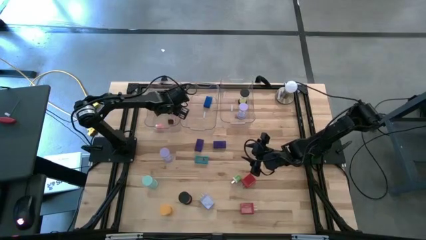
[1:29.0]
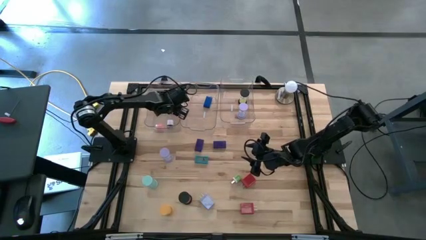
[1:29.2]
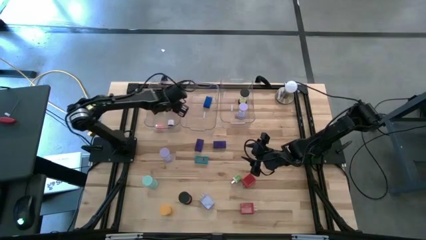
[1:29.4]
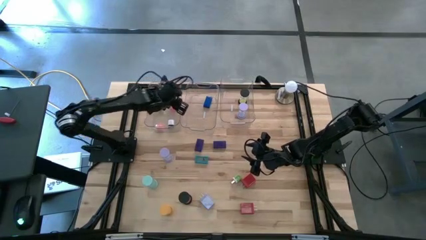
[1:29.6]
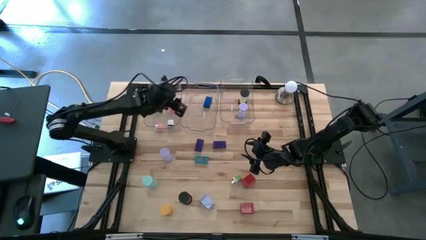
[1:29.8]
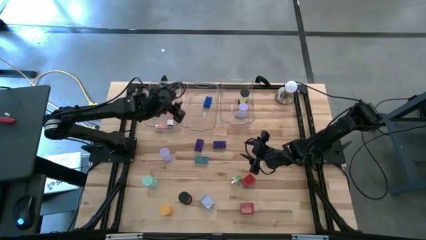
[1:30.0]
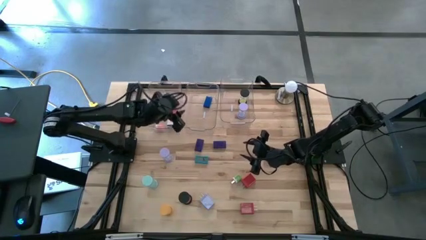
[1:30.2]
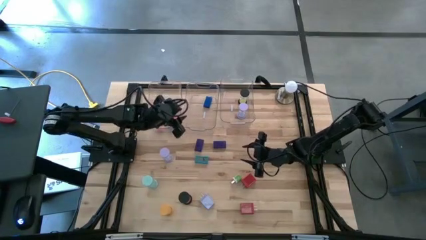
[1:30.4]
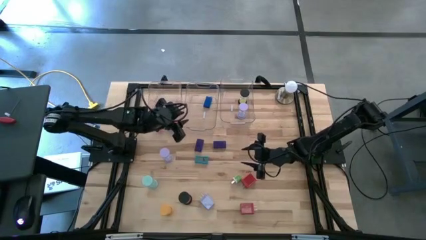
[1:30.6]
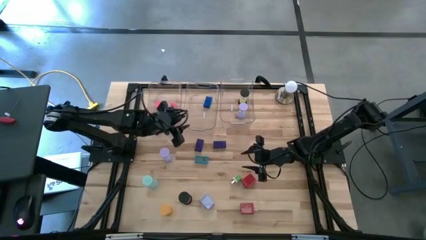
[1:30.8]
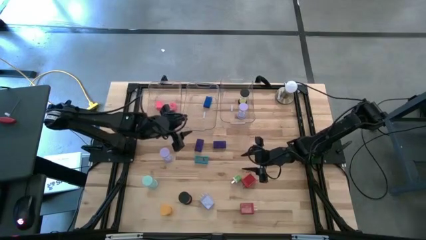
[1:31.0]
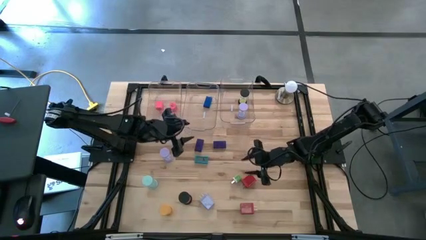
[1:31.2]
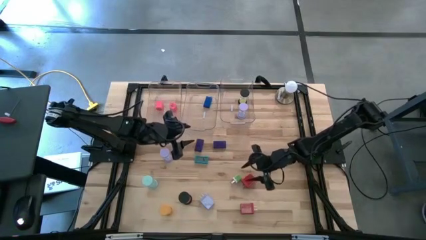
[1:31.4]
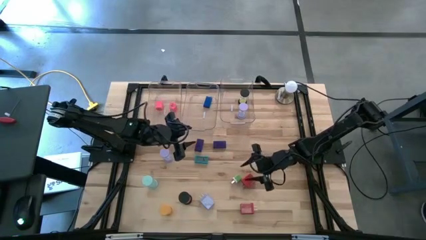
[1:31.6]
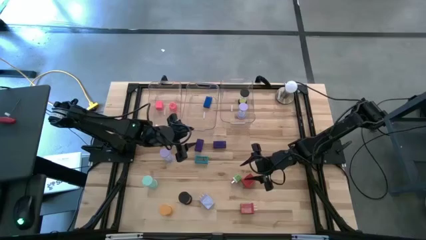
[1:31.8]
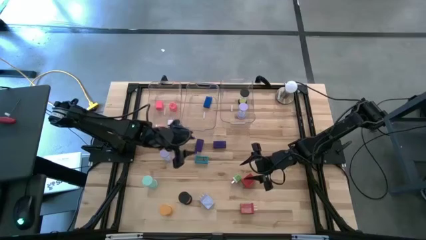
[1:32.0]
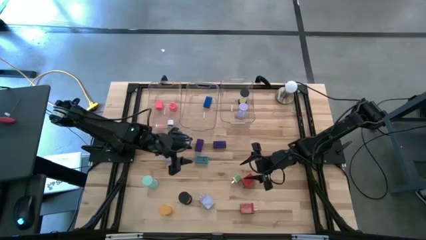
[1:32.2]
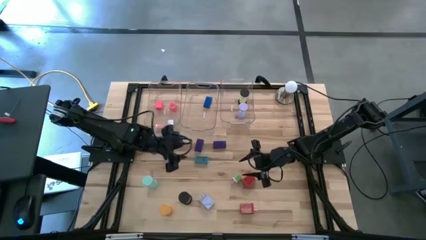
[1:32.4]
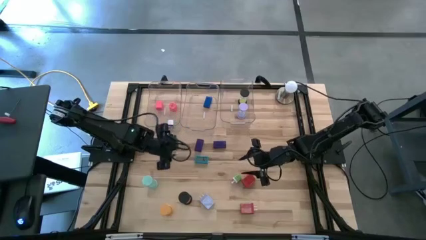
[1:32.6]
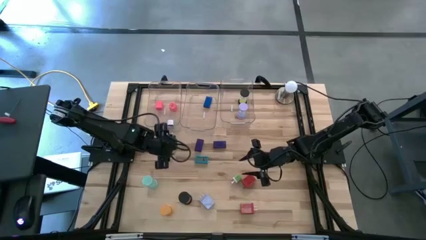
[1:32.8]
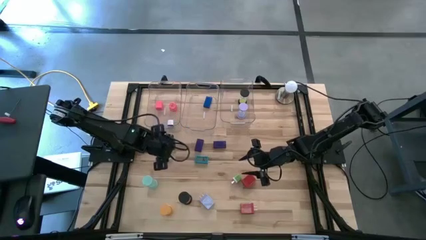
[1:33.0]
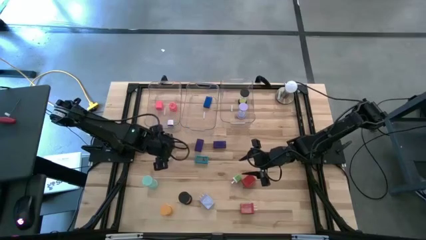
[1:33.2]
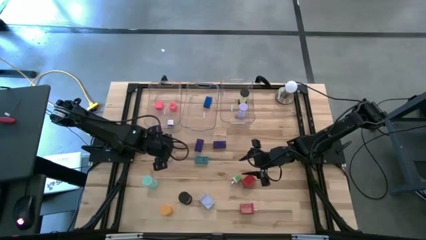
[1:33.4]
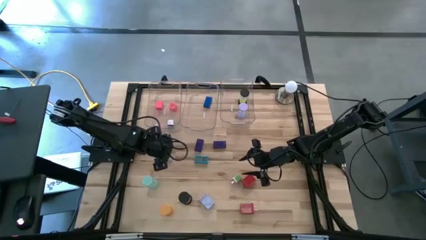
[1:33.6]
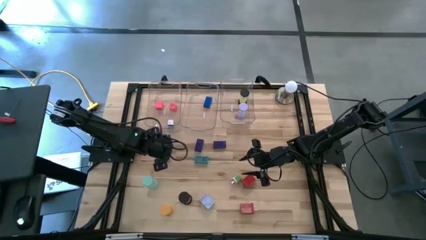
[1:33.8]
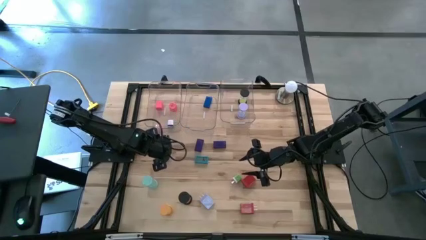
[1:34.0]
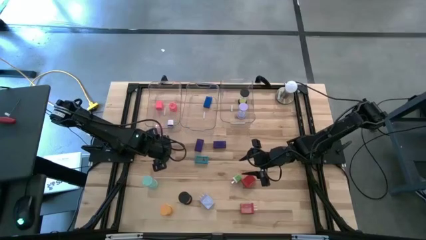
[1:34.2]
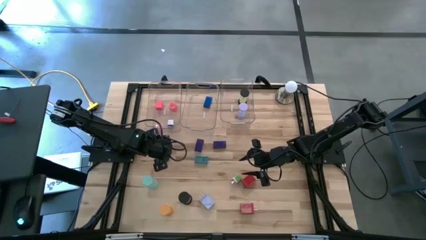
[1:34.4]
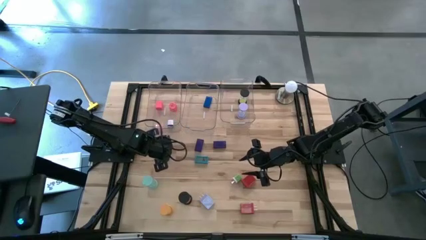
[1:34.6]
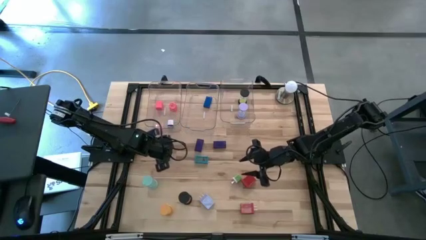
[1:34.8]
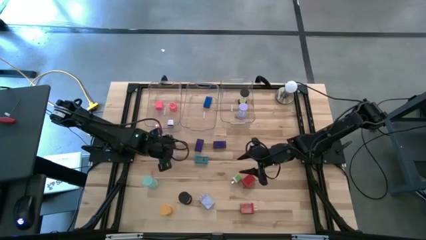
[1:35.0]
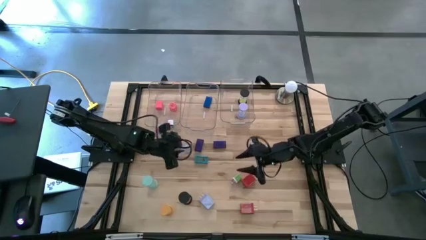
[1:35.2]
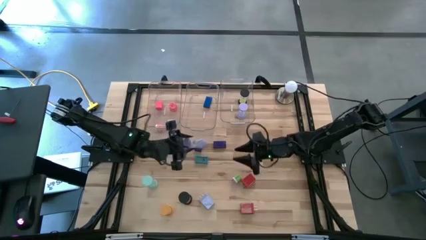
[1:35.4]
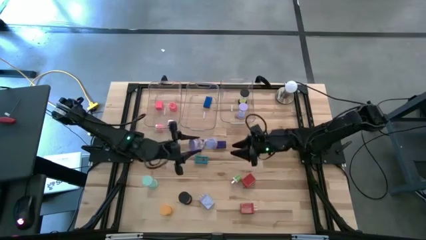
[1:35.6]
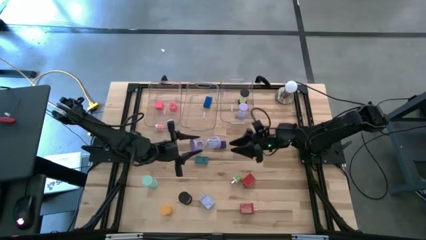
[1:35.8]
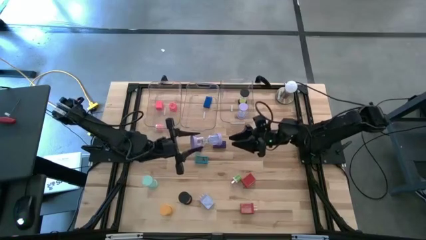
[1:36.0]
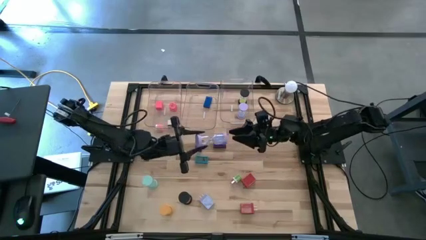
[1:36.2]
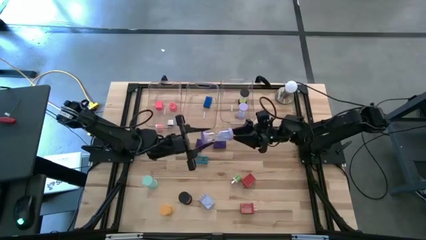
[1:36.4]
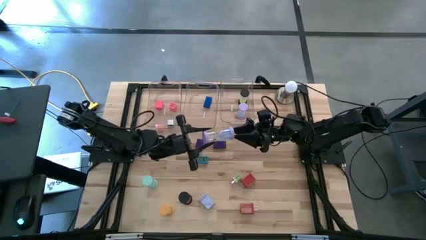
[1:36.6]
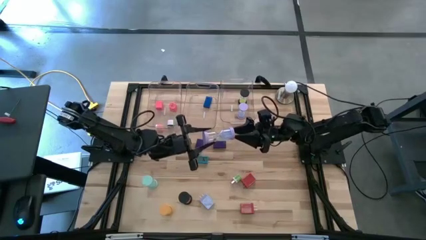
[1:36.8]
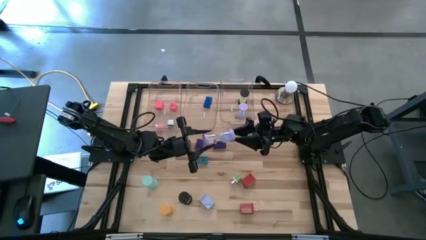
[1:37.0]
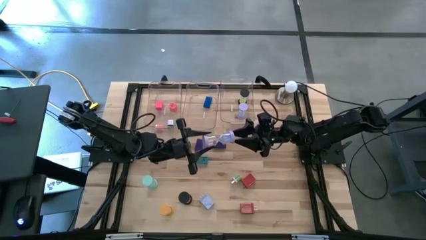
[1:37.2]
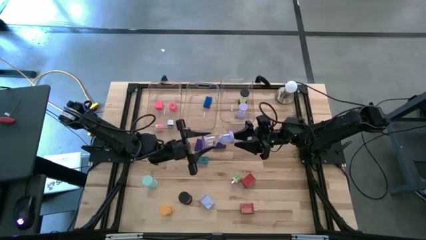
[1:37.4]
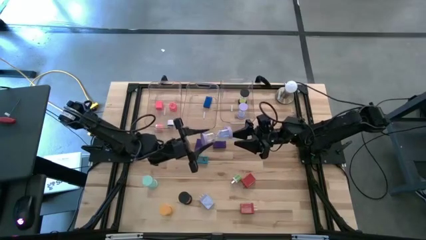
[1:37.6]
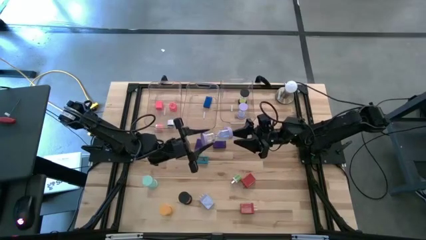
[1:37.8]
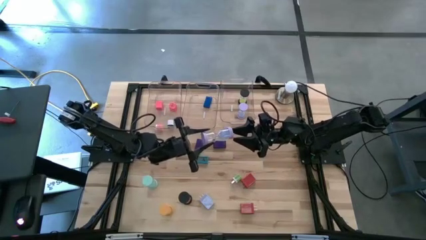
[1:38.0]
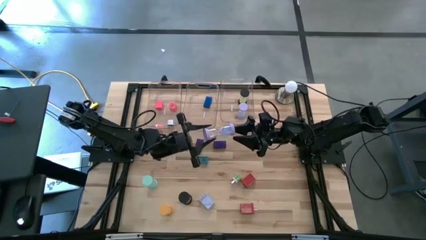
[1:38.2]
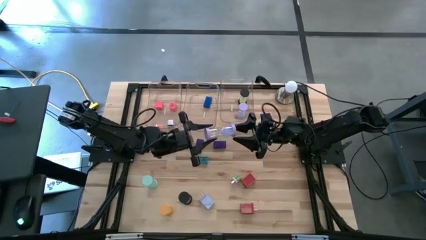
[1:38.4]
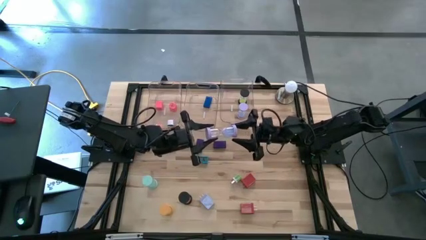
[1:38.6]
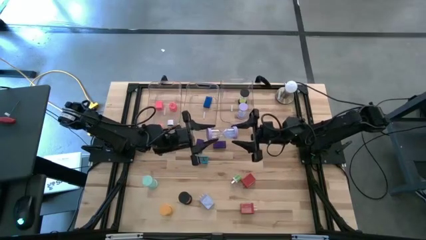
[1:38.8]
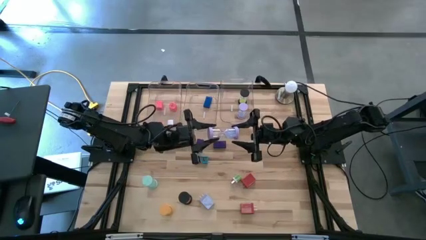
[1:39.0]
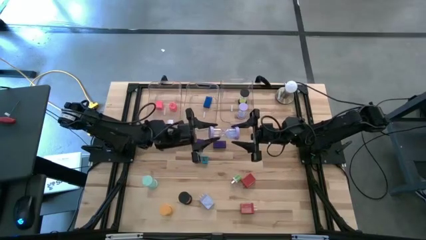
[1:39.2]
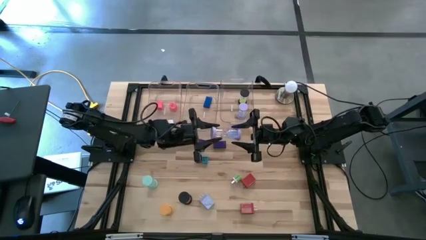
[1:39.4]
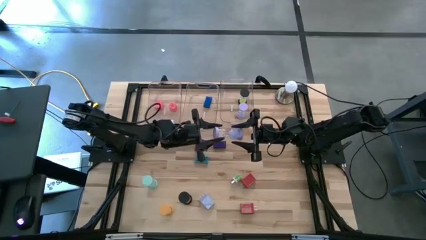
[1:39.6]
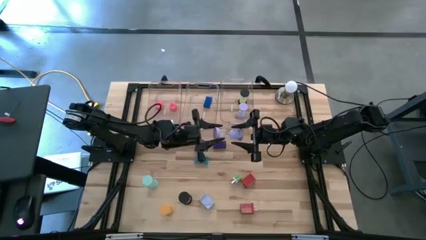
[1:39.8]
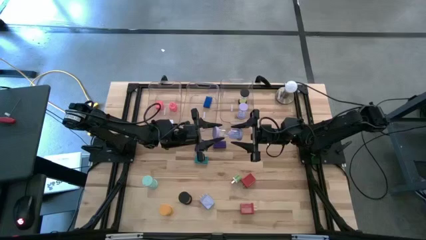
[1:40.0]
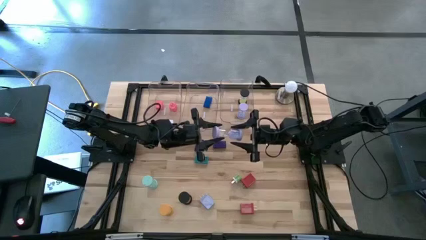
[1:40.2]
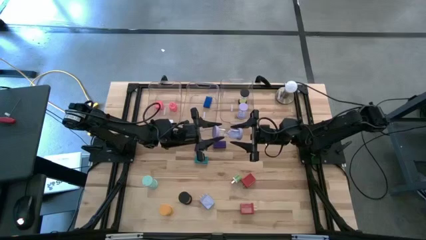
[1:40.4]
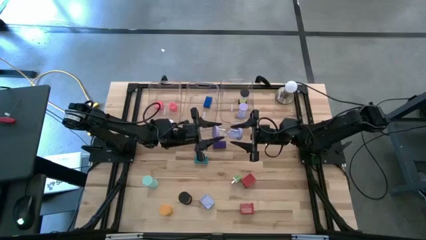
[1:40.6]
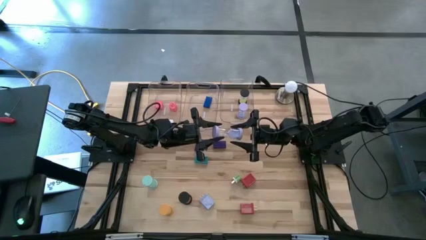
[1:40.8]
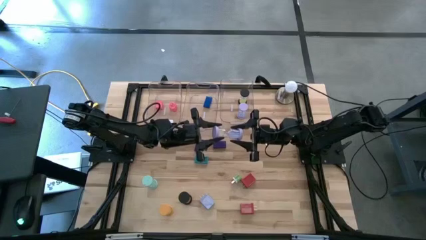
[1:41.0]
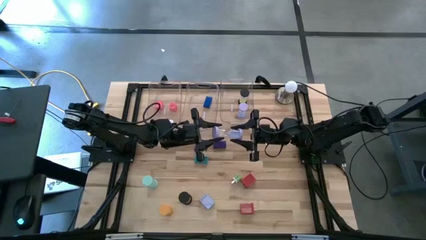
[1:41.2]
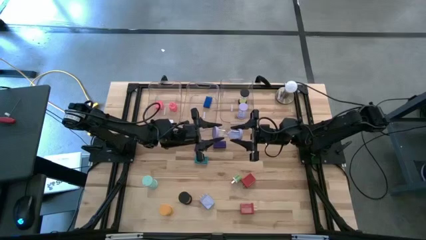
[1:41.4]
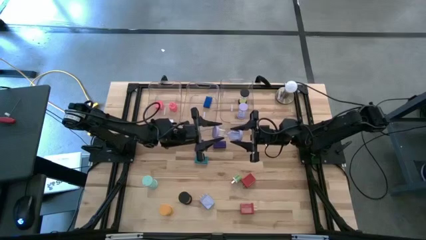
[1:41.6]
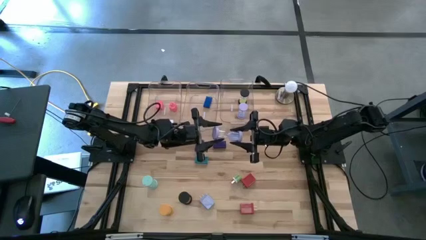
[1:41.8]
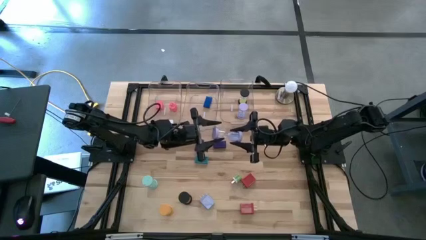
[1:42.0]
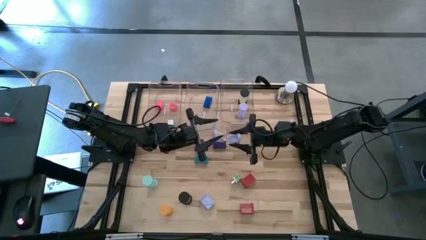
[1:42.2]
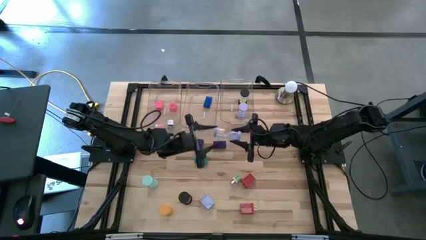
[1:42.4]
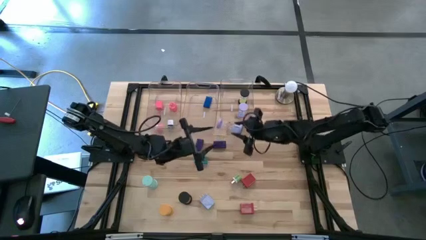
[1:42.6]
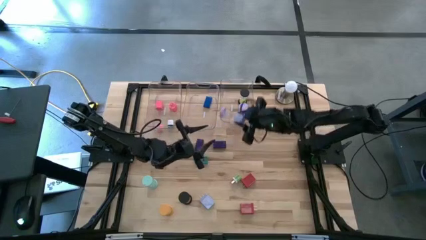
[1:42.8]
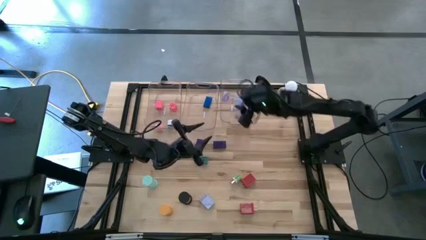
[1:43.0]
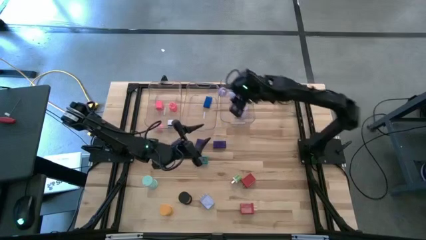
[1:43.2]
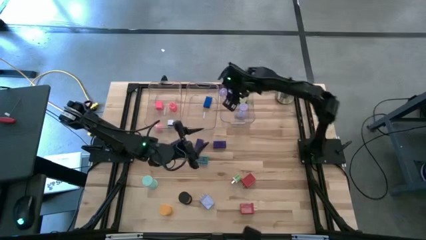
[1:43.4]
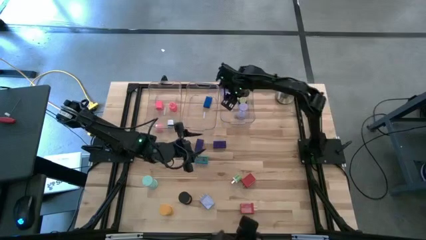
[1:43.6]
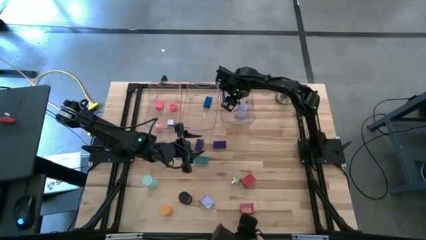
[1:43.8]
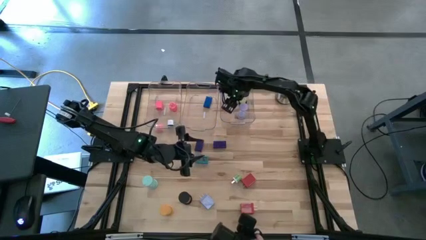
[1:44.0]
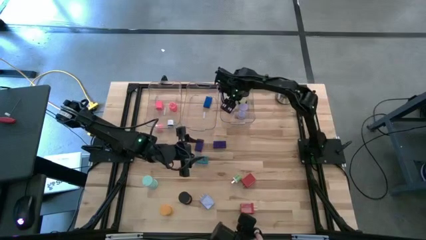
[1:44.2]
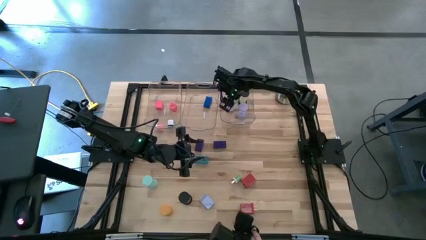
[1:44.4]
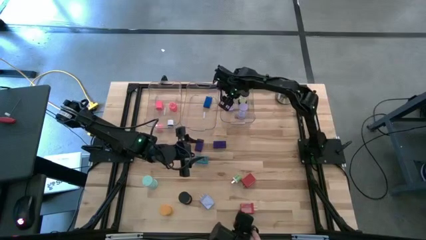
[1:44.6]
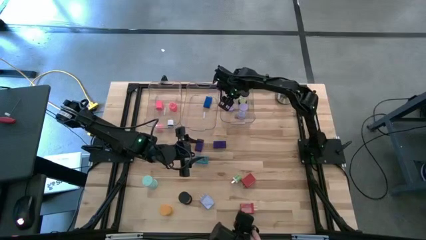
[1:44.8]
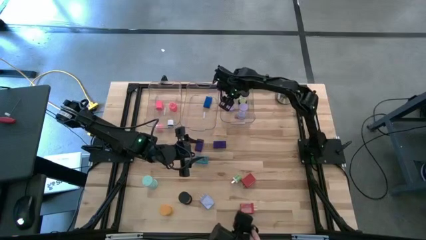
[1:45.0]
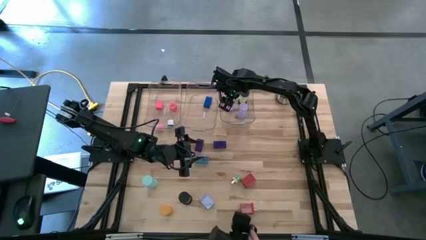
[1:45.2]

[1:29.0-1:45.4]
Task: Pick & Place Office items
Put the purple hourglass into the right transparent bin

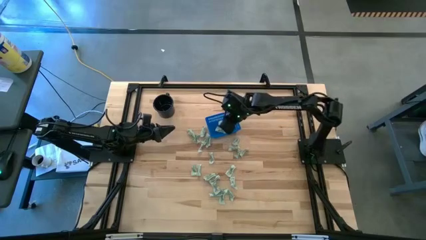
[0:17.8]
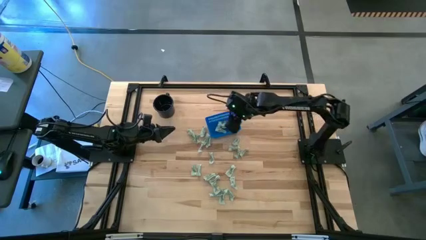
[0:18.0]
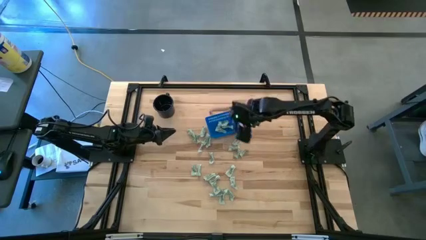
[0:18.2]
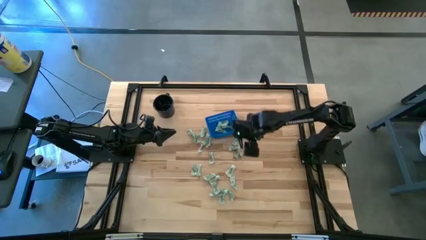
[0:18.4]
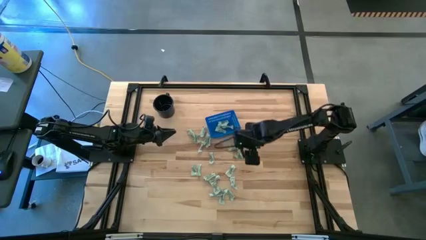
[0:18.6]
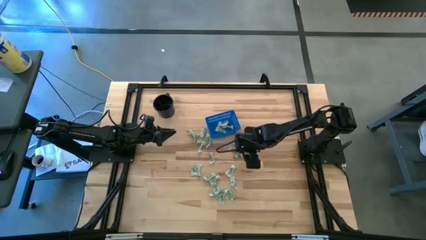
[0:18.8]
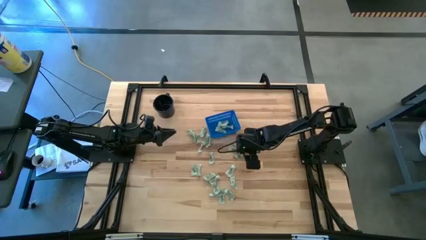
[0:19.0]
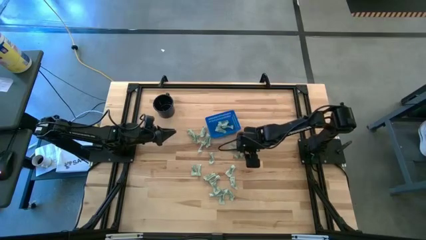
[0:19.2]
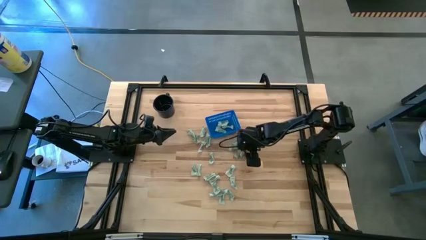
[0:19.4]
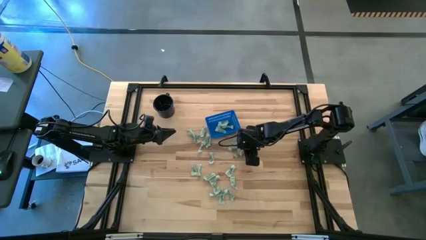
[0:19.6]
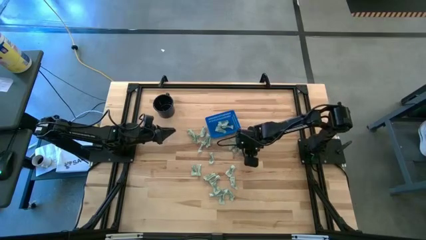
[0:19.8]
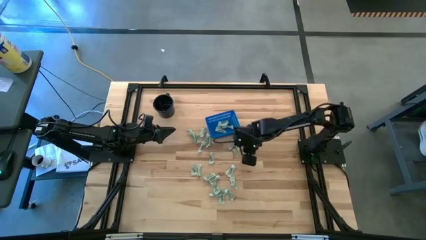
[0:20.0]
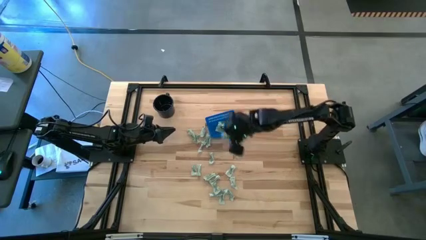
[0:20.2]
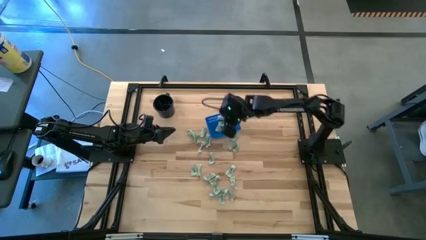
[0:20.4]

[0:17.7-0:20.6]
Task: Pick and place Stevia / Truvia into bins
Put the green stevia packet into the blue bin
